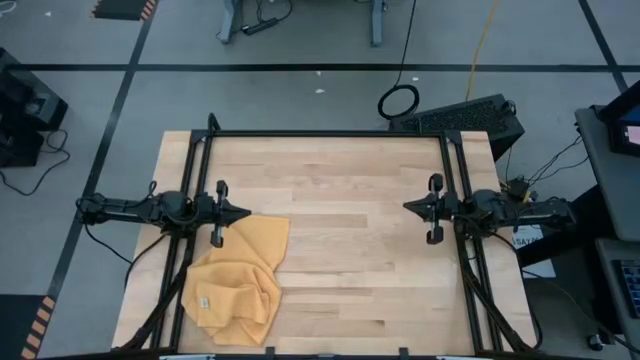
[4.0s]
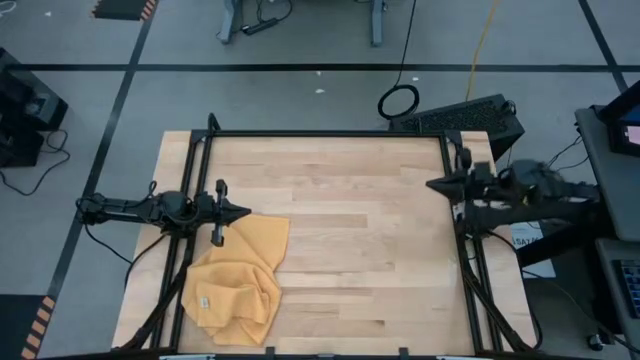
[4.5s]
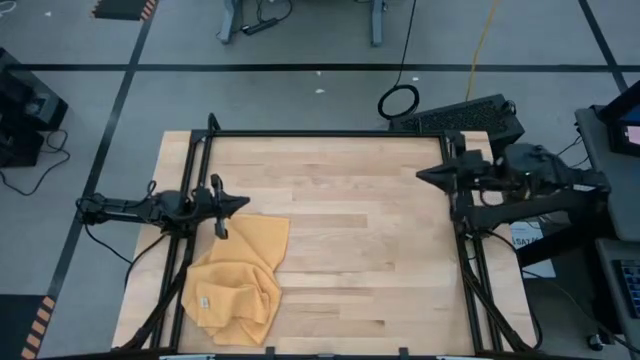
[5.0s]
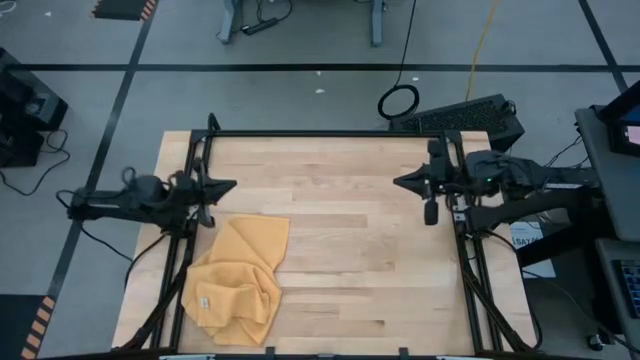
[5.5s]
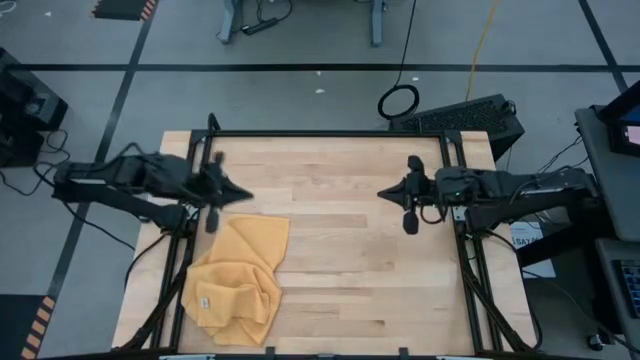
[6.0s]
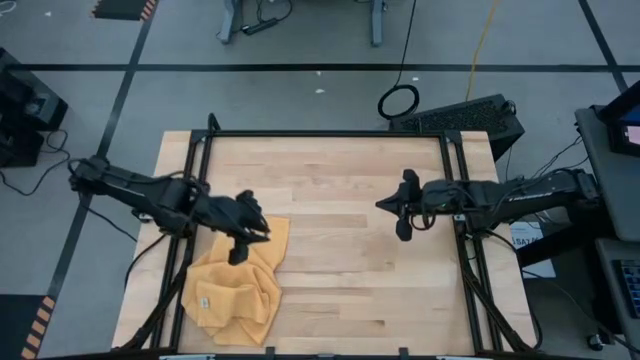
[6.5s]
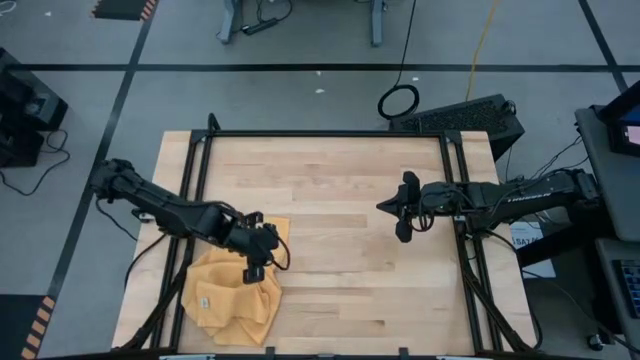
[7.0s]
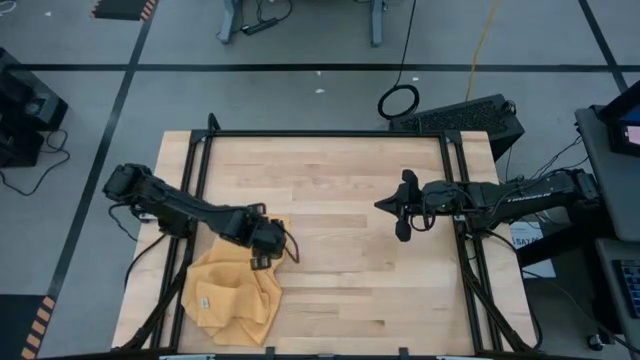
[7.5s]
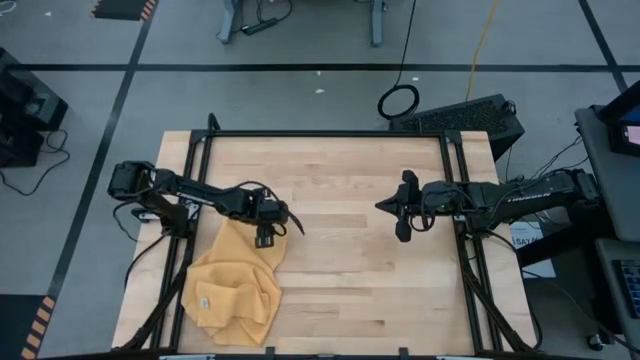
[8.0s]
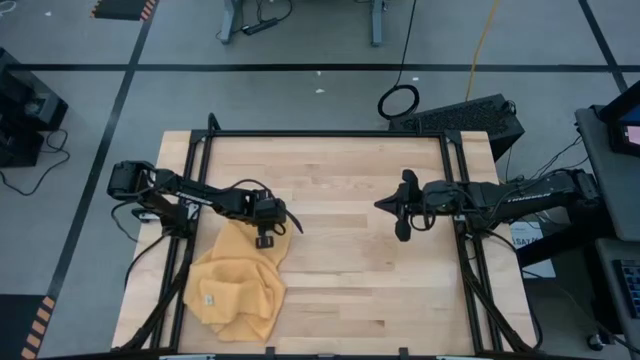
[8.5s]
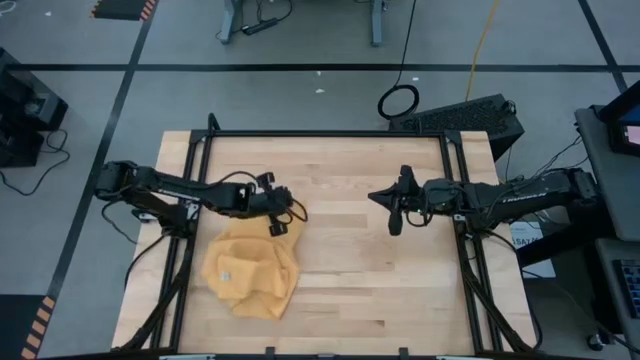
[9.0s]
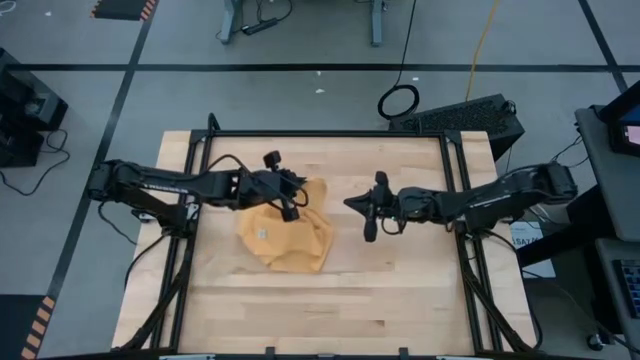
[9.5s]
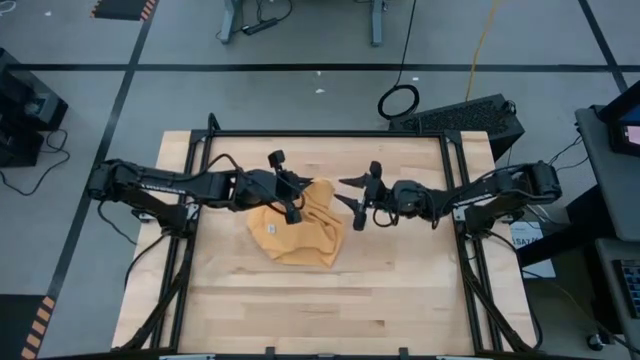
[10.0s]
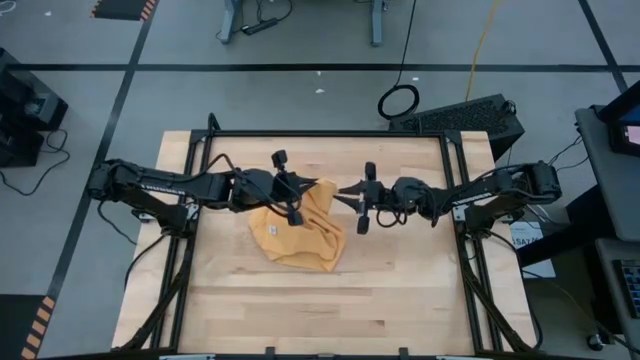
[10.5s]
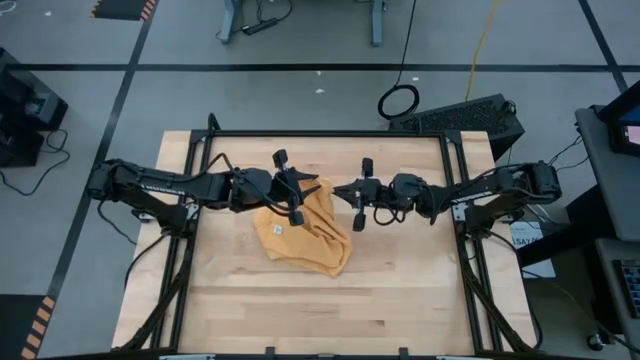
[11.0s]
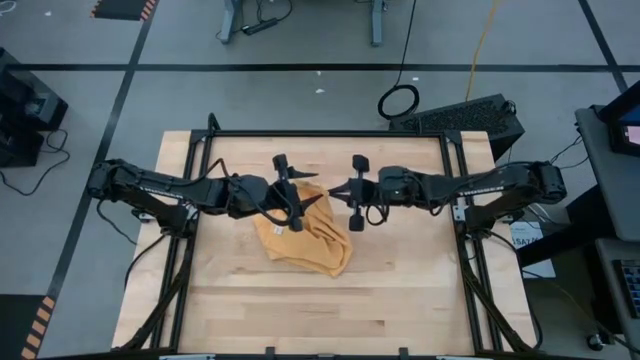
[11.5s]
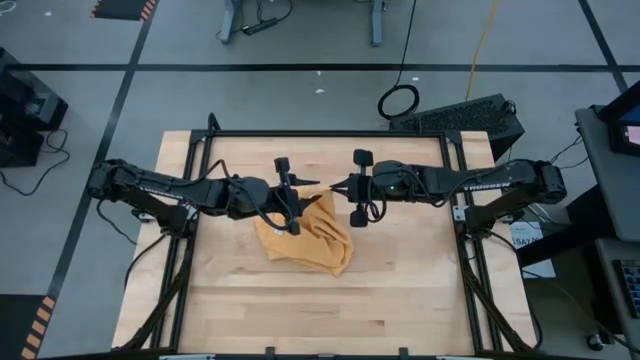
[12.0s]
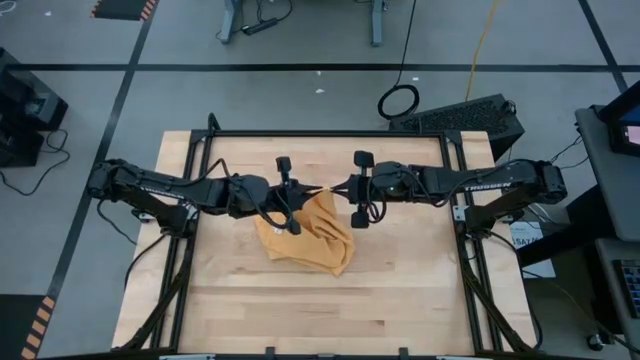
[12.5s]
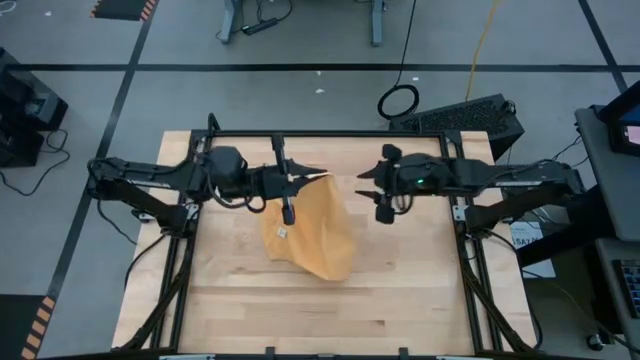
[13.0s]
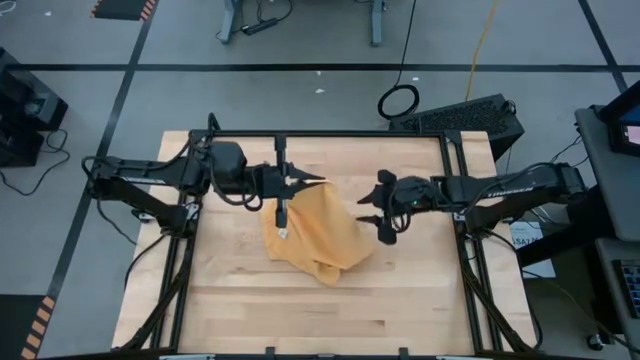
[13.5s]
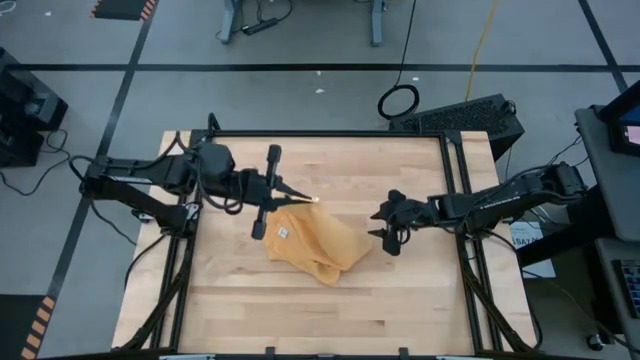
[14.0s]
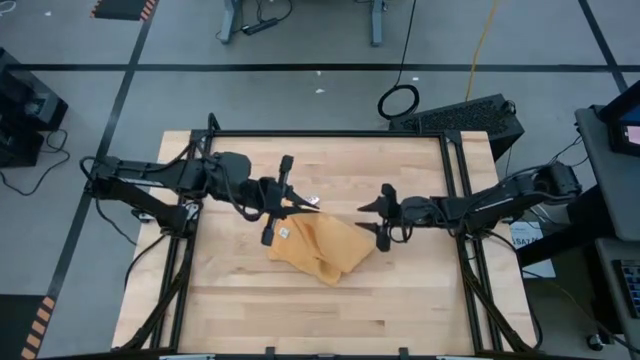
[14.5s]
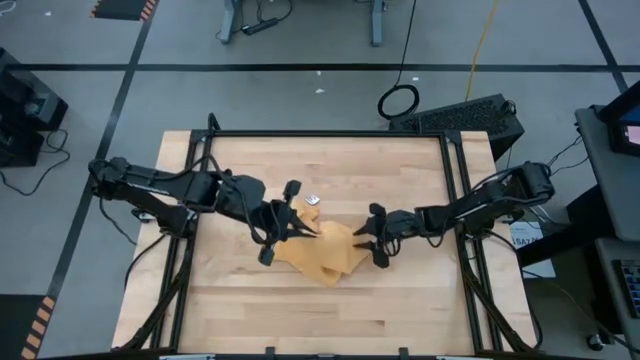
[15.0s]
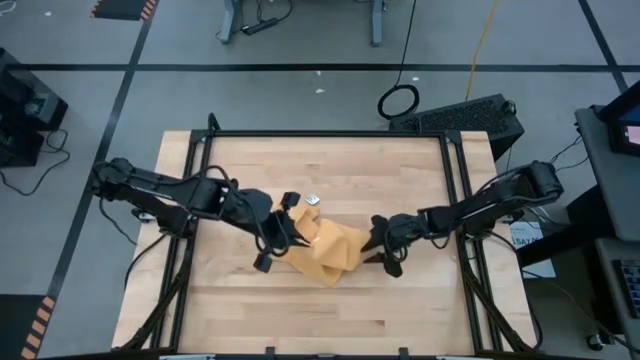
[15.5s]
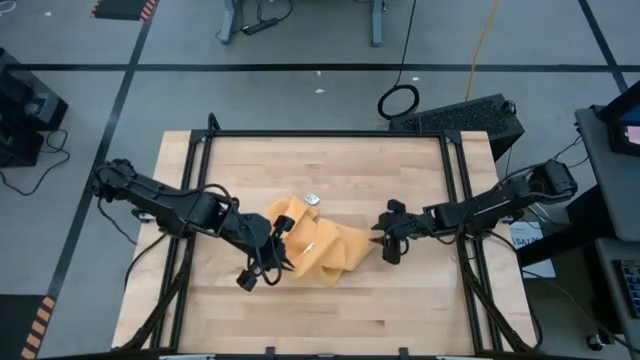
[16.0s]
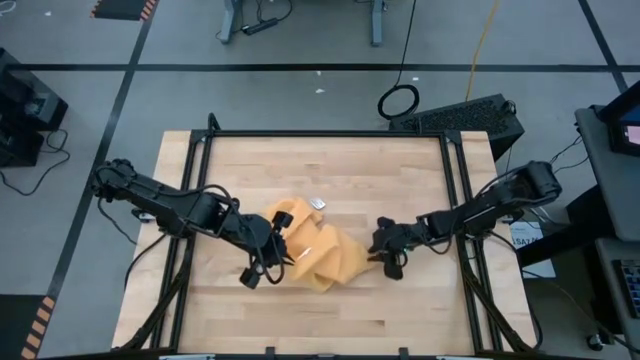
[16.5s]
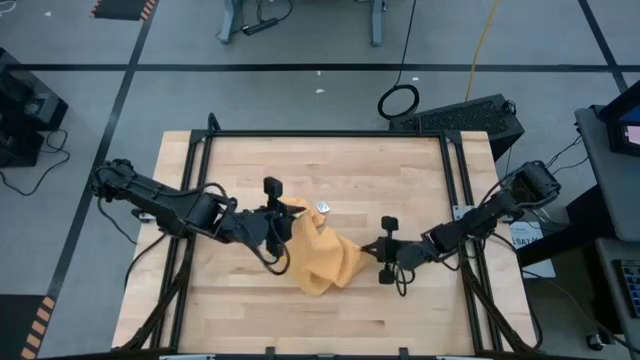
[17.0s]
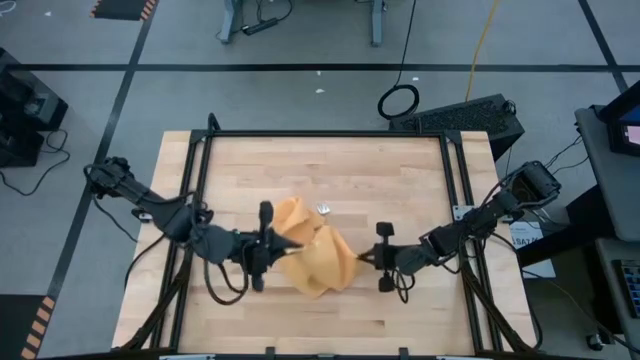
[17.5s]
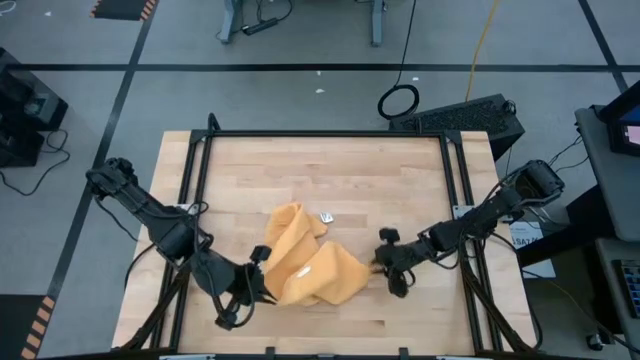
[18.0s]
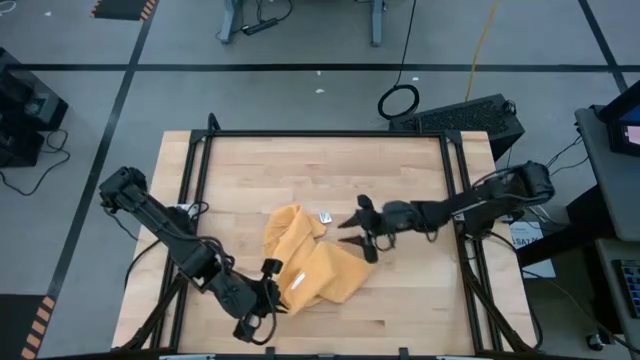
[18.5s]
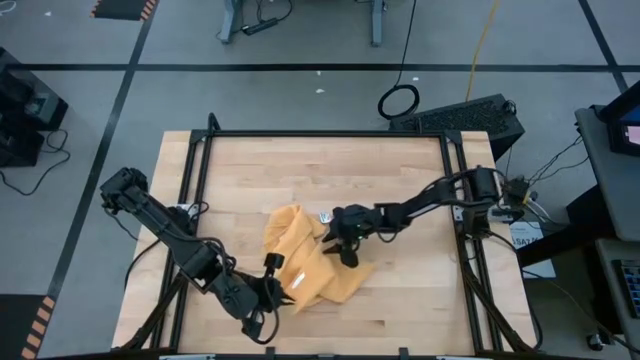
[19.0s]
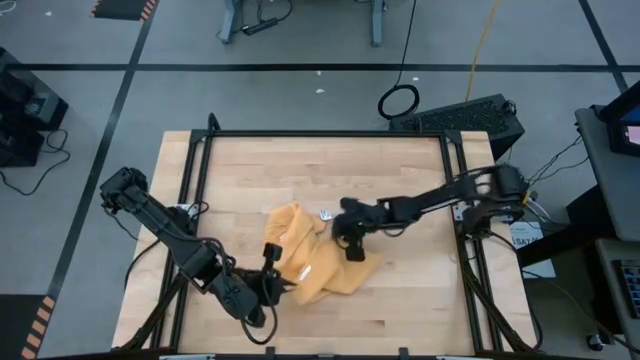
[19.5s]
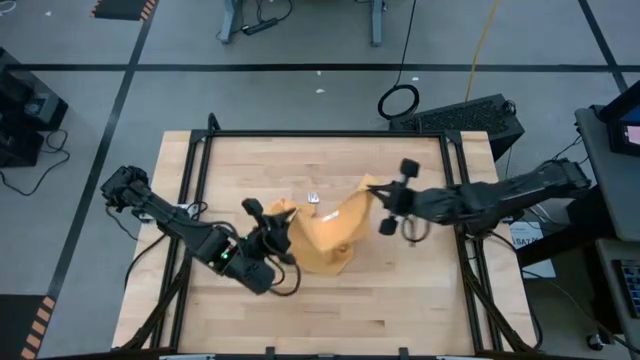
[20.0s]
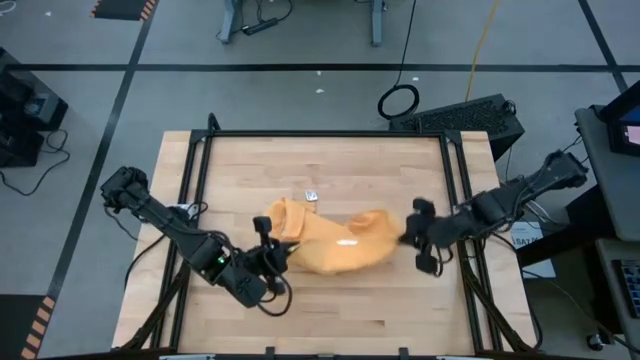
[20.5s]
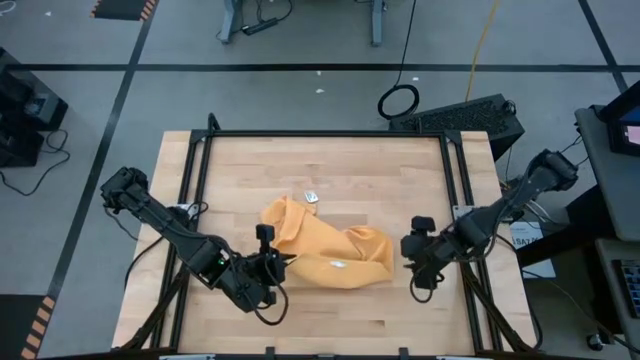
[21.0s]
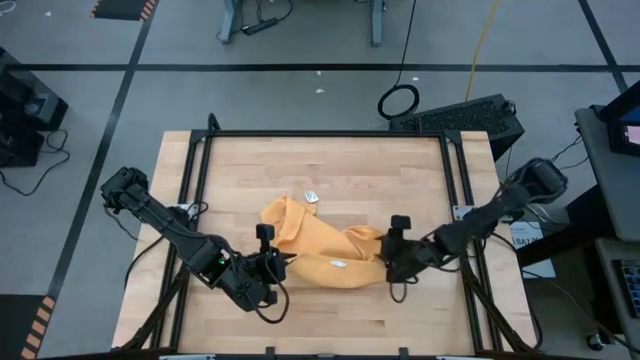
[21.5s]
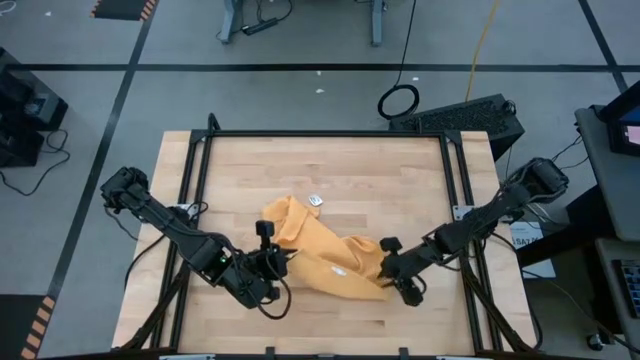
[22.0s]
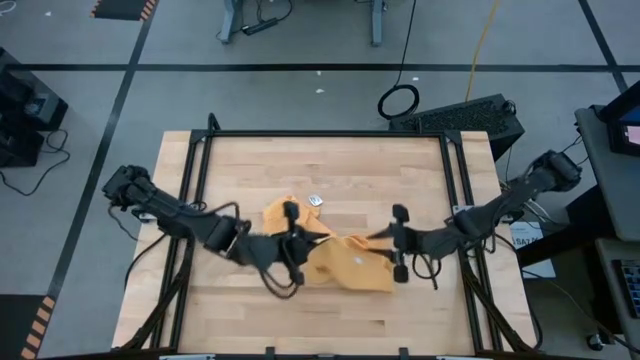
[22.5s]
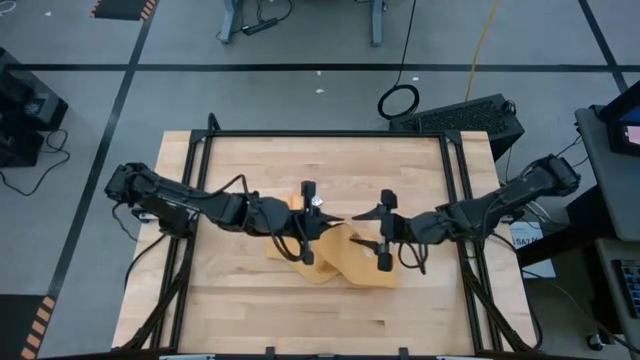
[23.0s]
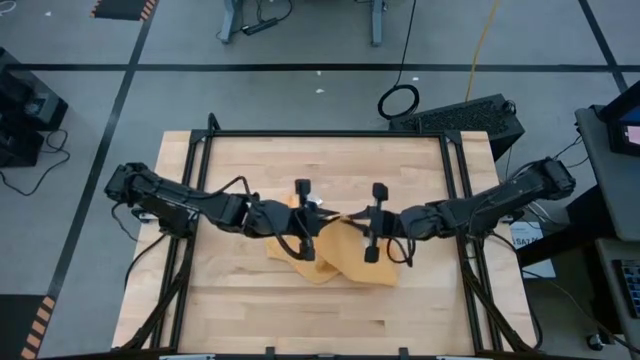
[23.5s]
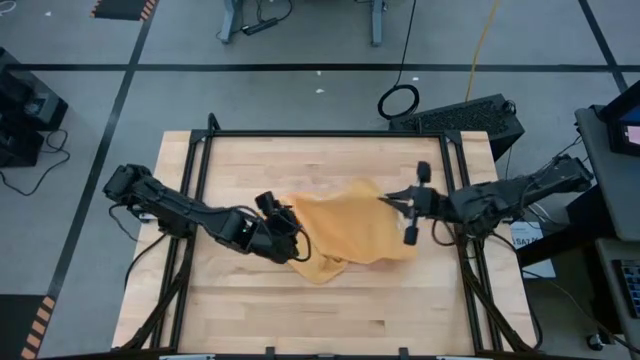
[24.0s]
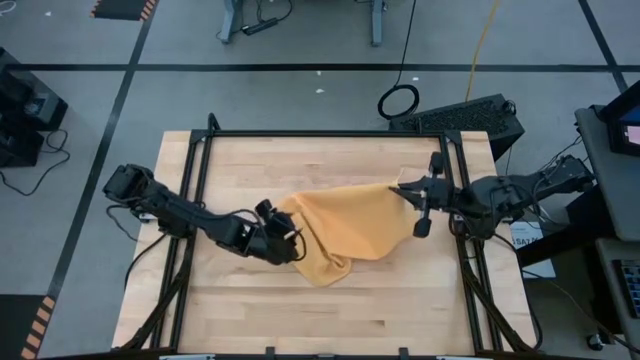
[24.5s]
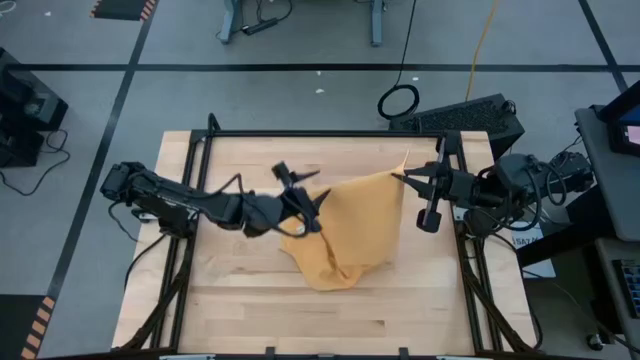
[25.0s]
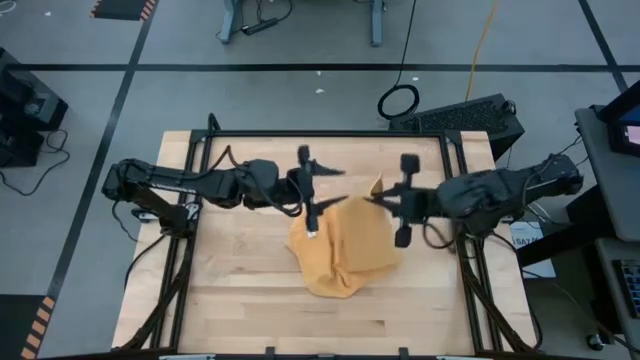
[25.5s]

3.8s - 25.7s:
Task: Roll towel
Fold the yellow towel
